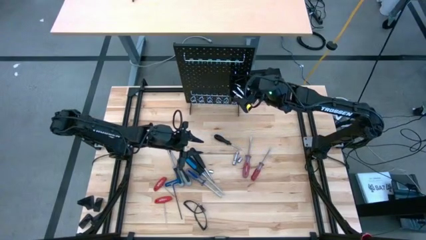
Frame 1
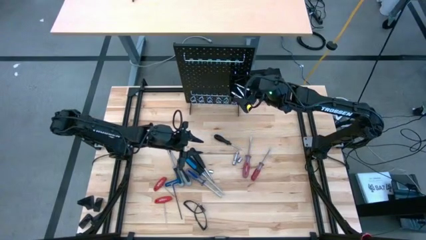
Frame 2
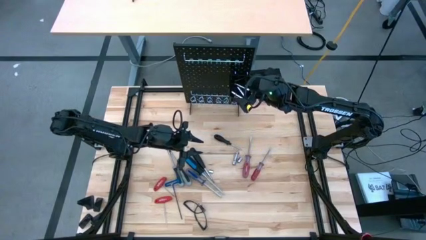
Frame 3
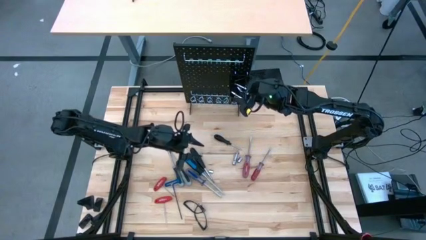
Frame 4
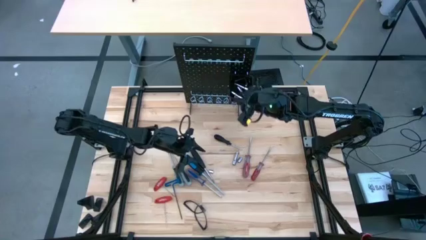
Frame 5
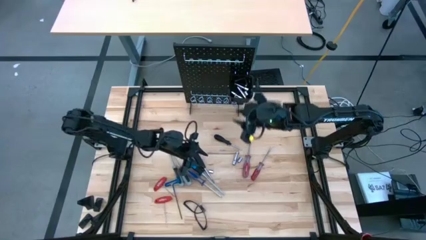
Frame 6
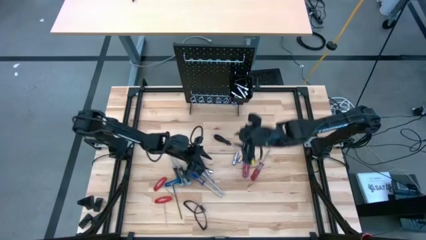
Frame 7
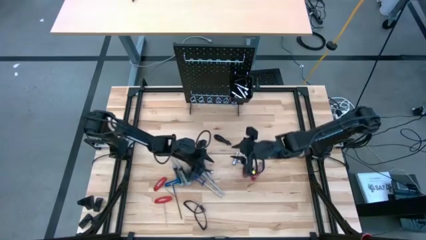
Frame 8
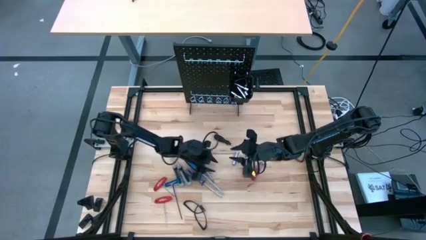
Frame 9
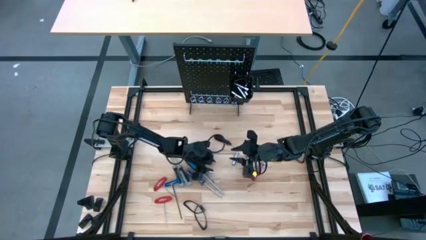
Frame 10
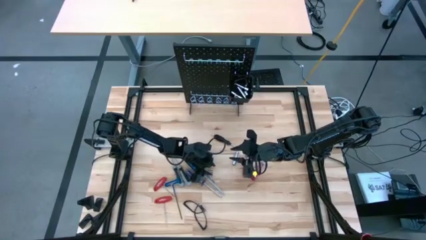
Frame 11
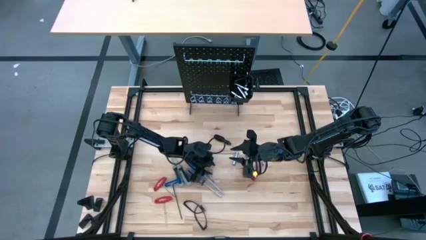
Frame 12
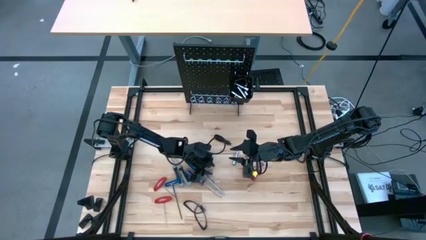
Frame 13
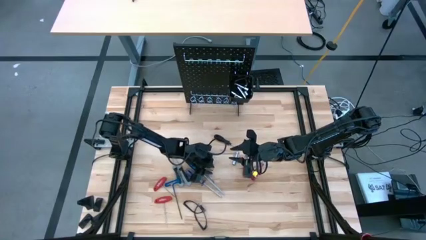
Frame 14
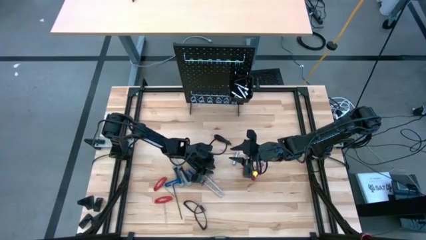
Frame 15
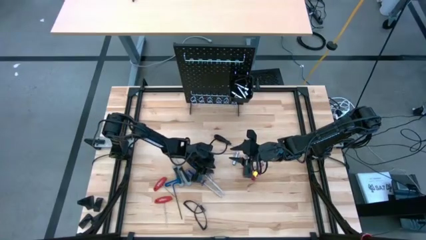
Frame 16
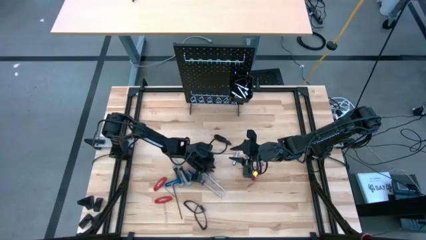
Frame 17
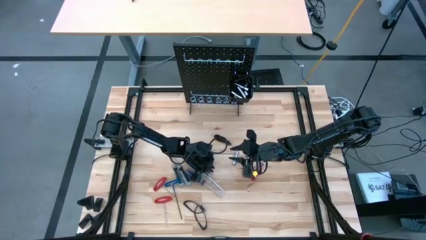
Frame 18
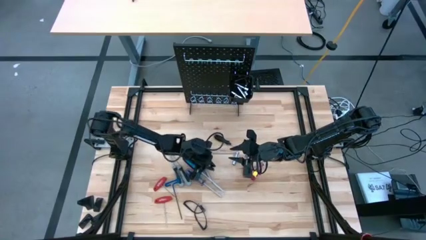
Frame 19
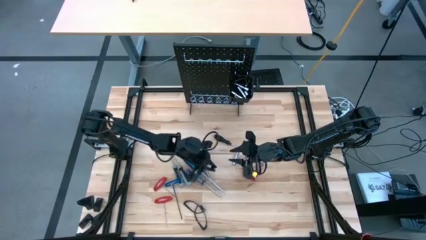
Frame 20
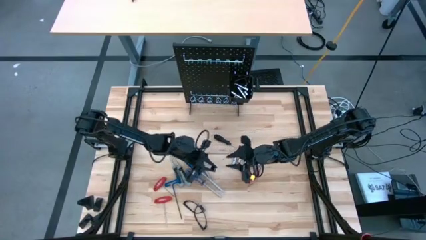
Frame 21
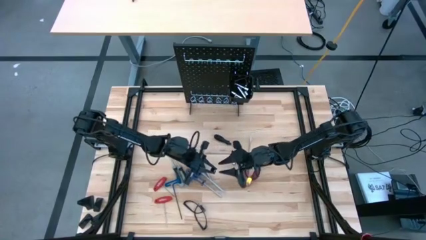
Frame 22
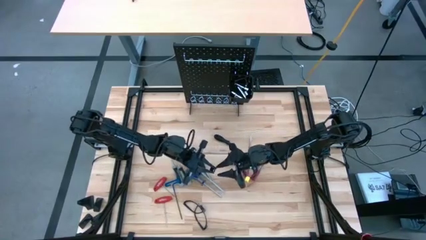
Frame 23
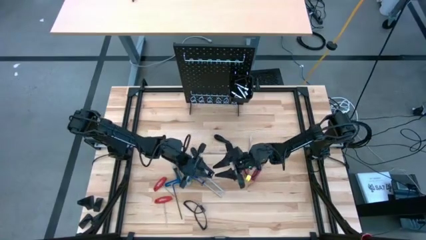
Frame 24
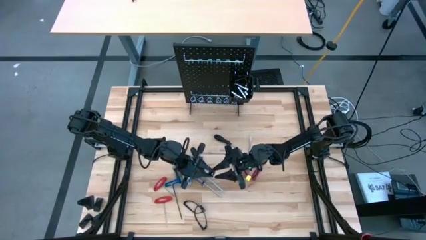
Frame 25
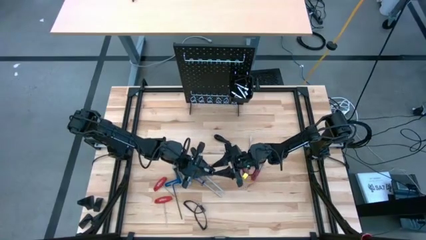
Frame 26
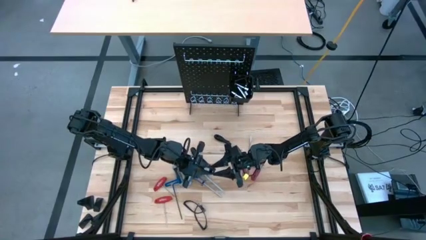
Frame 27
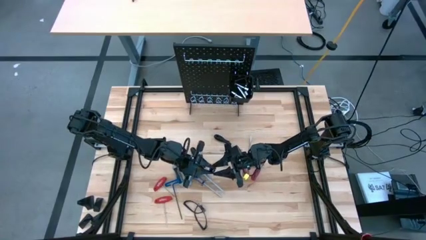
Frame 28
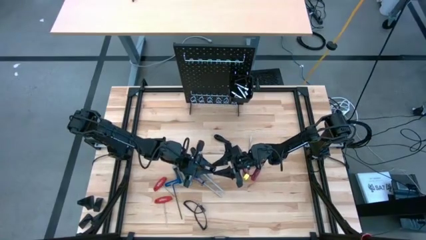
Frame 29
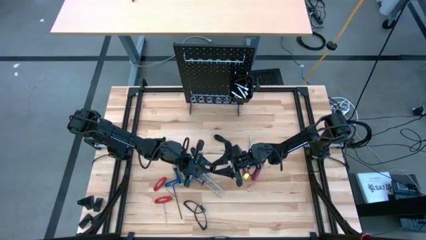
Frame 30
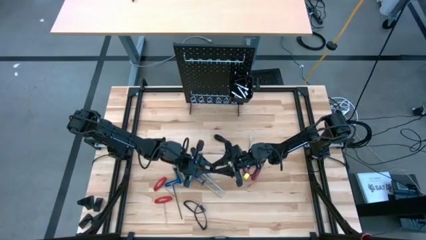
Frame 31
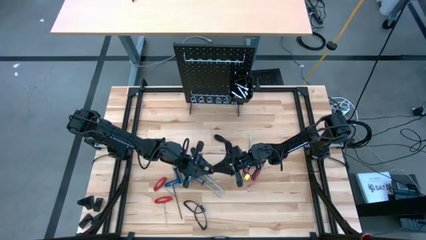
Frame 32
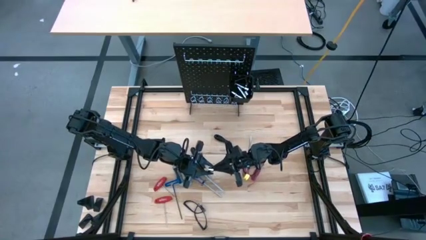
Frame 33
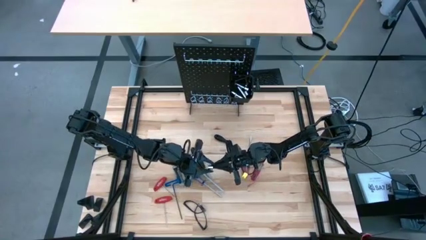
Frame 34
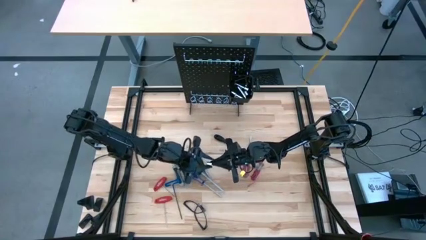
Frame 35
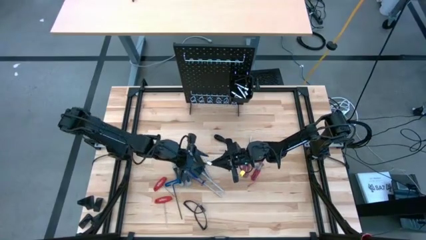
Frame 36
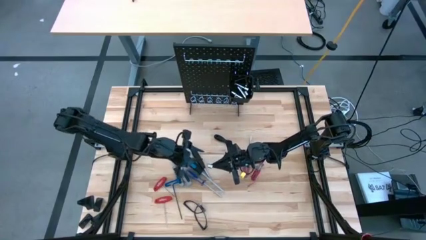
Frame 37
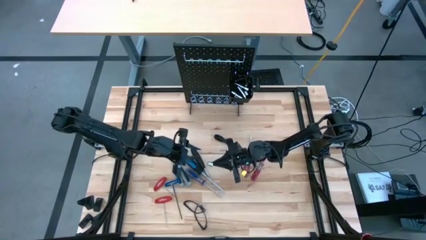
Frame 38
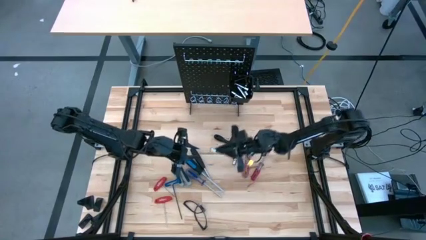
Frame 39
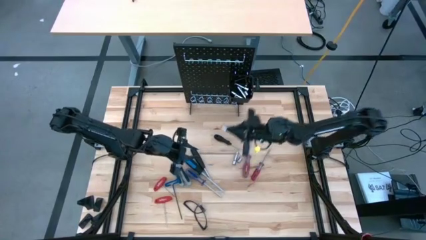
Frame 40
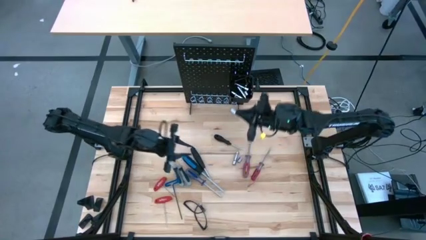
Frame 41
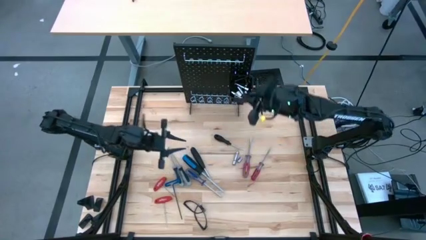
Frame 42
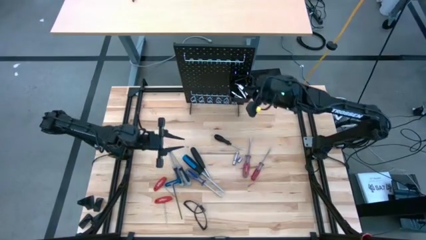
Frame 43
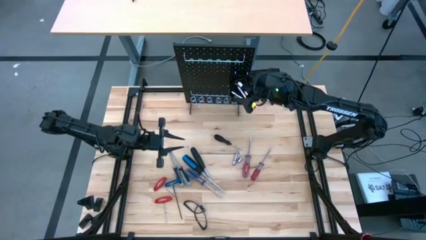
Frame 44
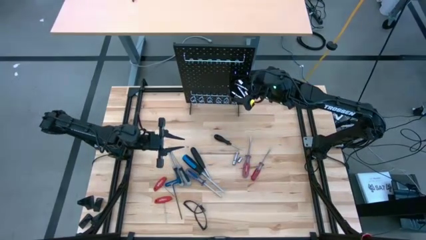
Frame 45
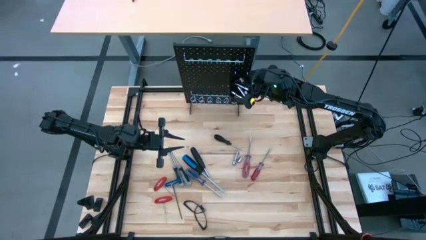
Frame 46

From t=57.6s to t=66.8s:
Task: Hang tools onto peg board
Put the socket into the black bin on the pegboard

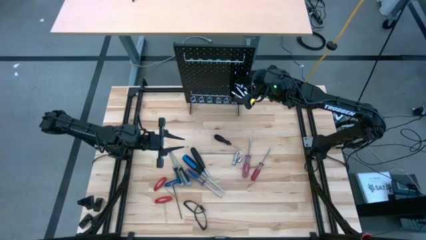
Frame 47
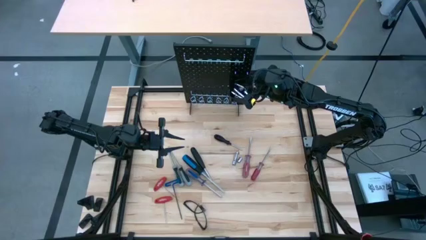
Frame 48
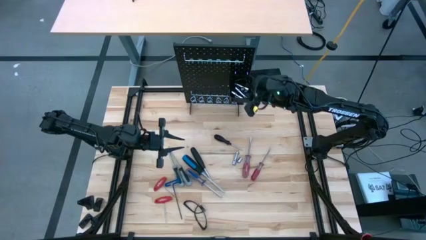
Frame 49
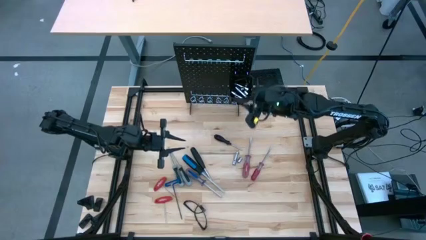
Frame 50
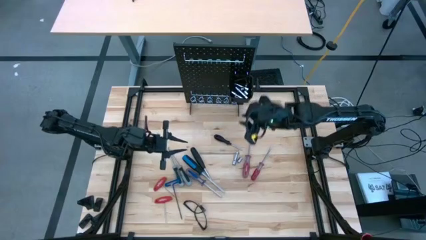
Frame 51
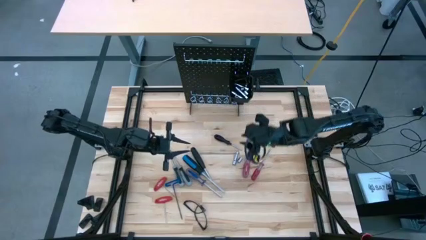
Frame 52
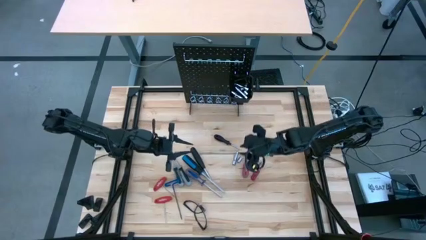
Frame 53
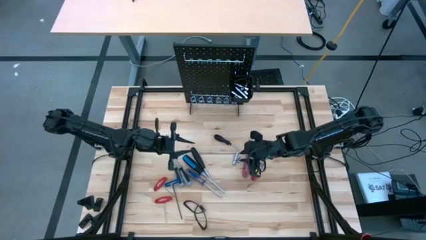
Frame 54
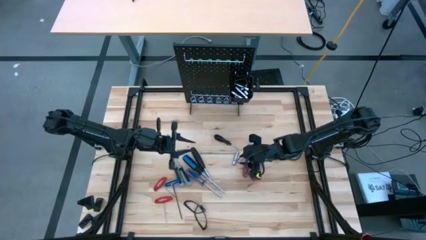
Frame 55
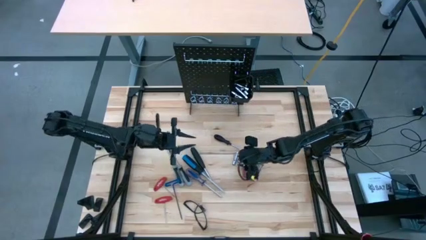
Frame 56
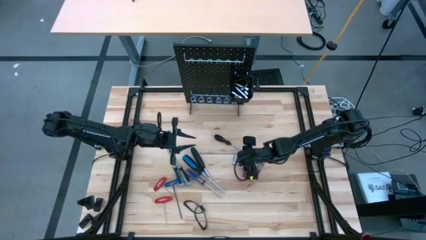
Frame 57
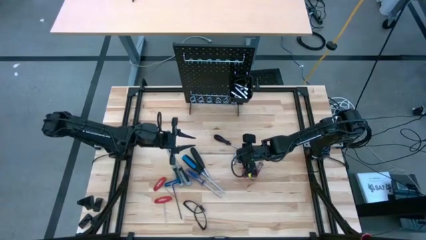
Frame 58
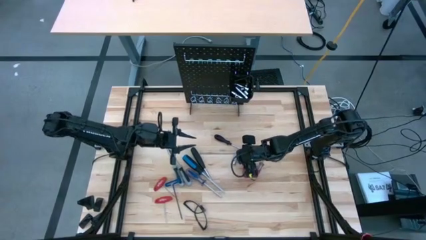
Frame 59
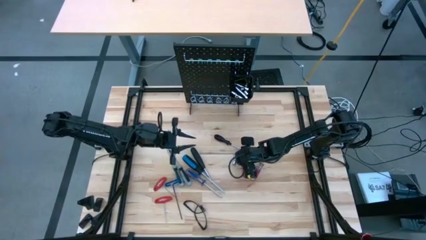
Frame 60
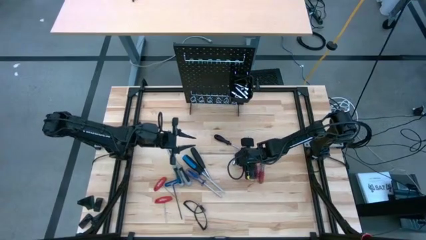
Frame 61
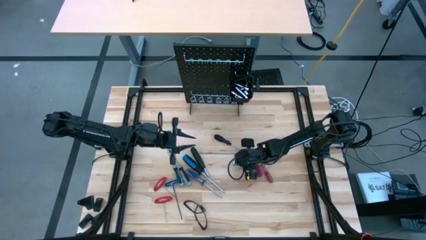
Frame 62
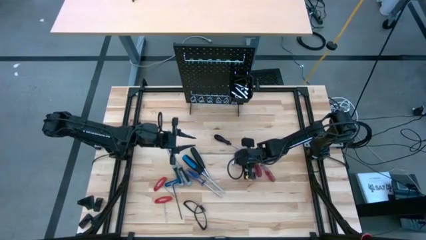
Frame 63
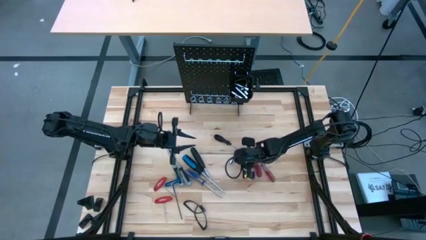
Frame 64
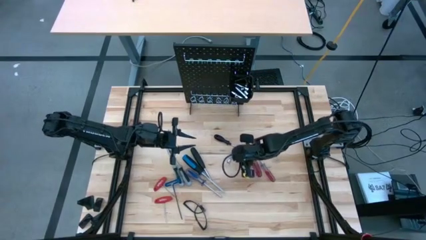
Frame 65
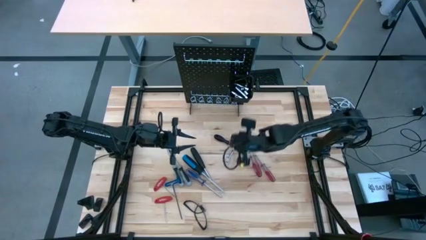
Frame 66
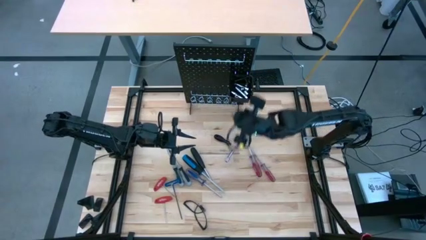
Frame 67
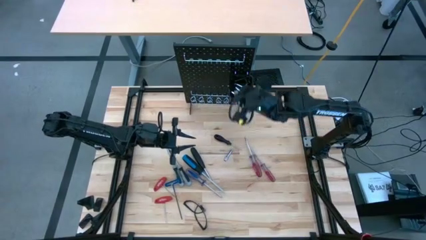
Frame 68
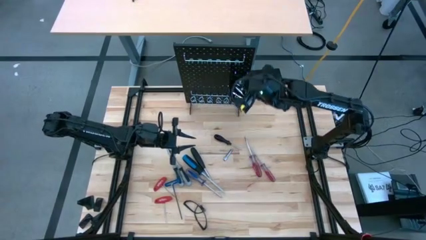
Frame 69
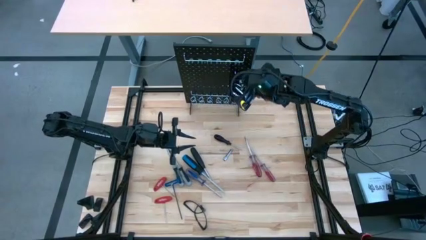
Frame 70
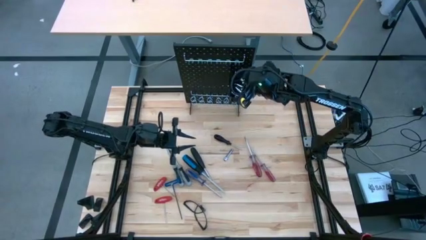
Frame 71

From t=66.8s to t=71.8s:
Put the socket into the black bin on the pegboard

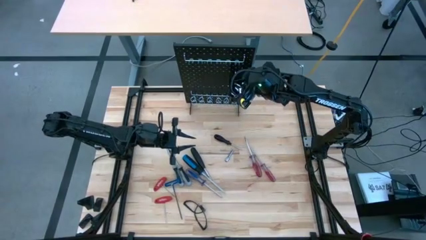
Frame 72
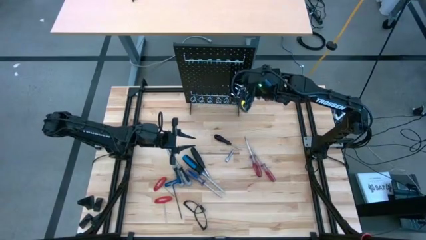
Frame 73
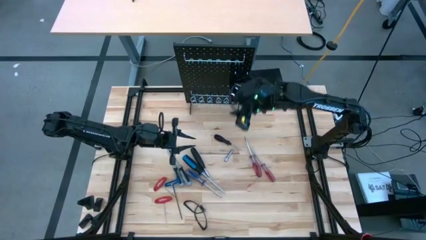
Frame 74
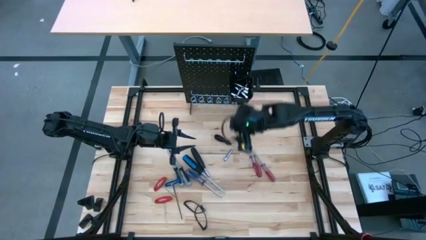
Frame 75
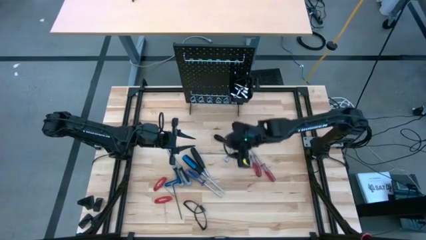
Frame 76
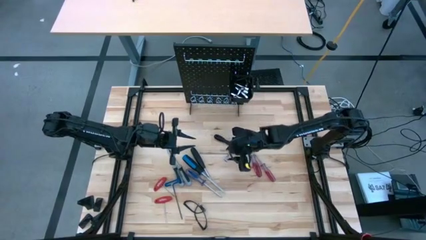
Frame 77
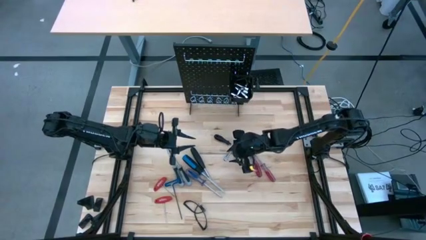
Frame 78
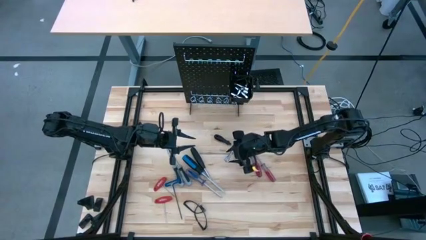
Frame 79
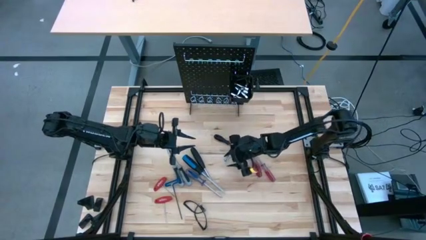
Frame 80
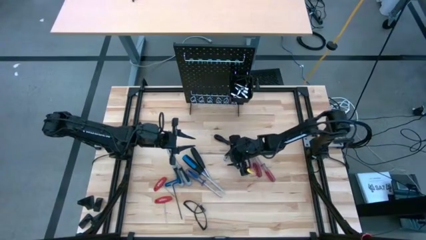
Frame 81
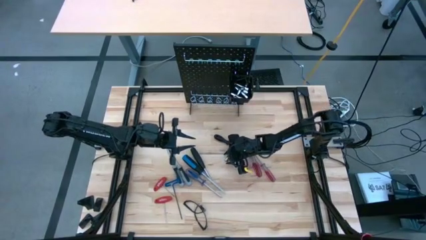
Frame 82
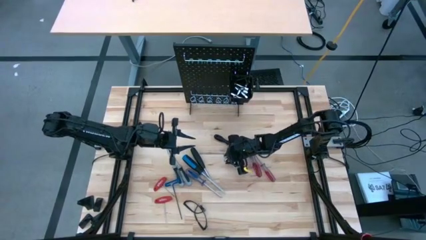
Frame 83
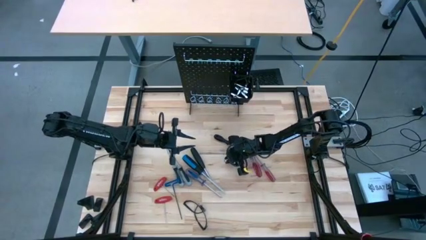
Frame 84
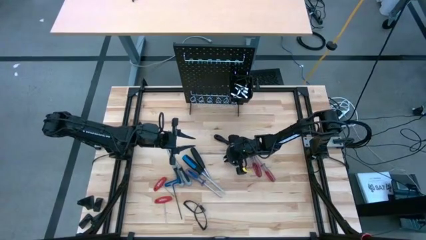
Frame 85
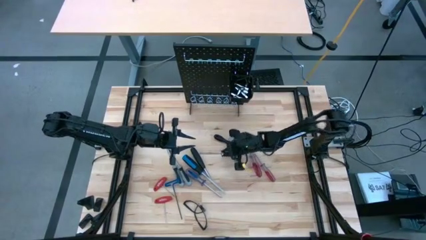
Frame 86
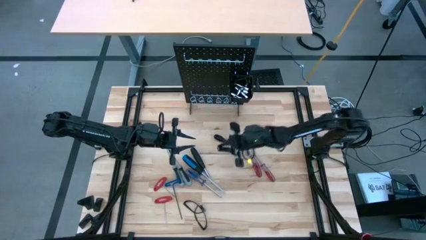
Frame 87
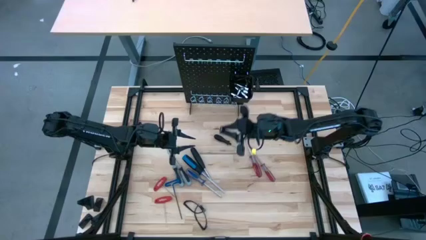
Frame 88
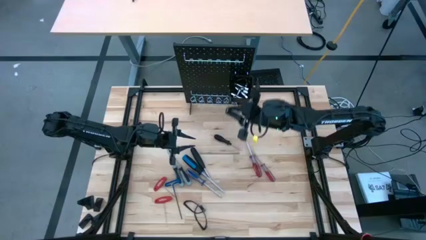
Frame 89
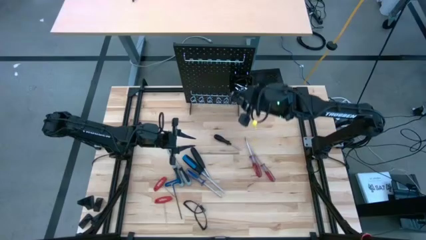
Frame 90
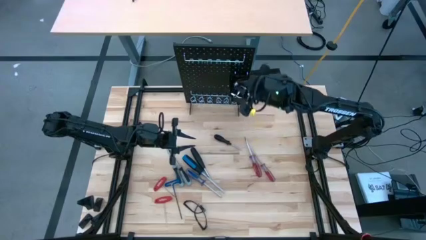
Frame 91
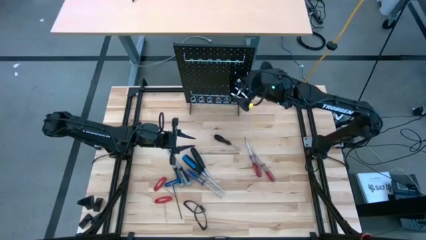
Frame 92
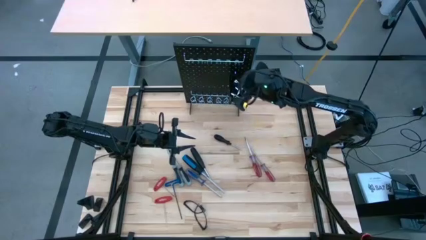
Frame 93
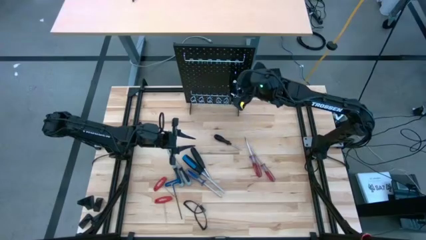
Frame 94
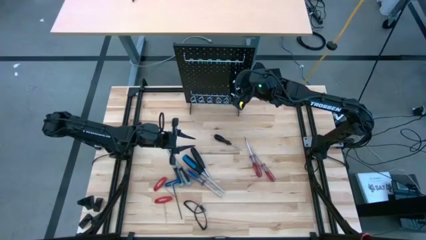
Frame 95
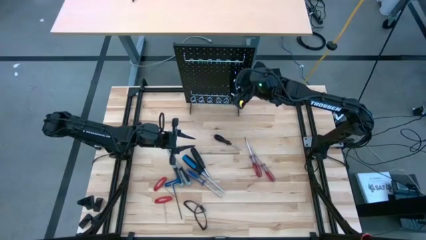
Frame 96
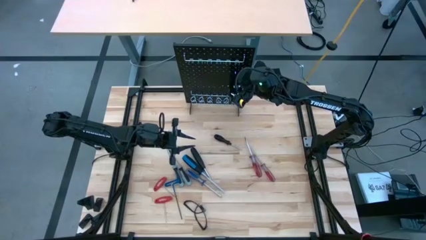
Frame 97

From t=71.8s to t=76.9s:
Put the extension bar into the black bin on the pegboard
